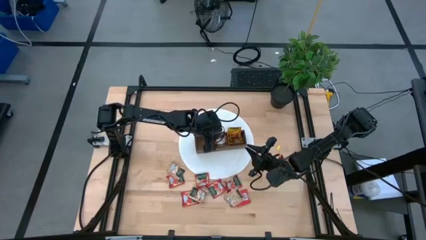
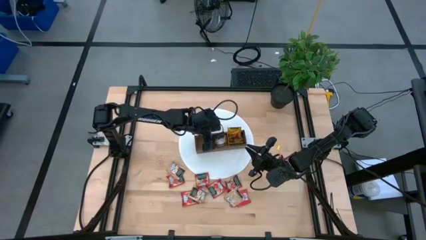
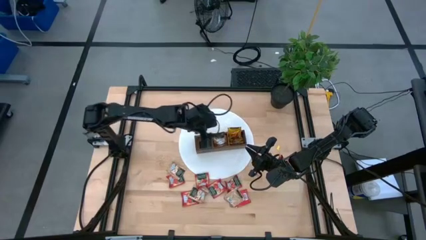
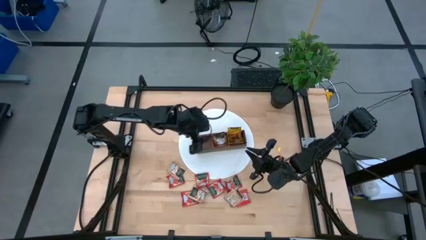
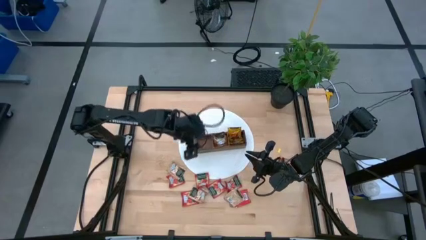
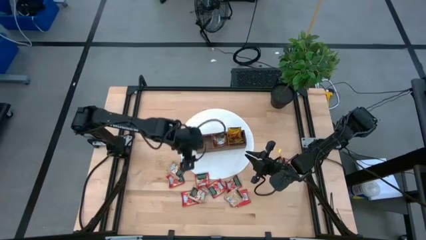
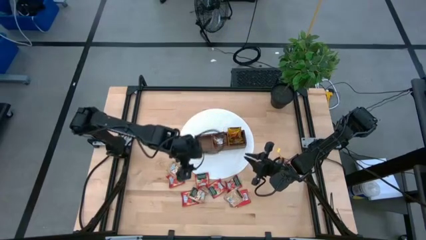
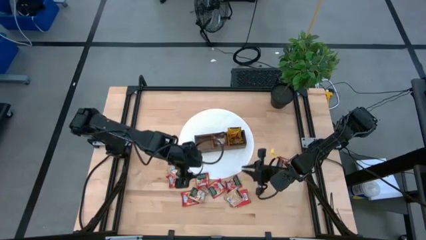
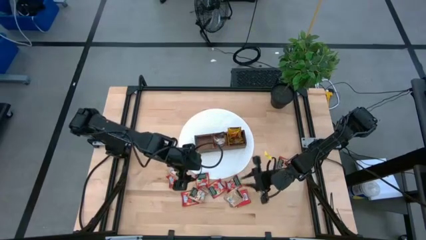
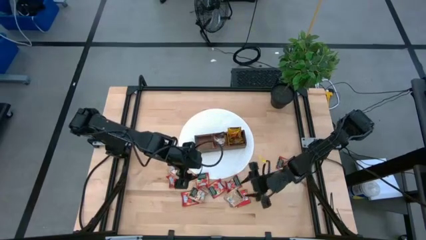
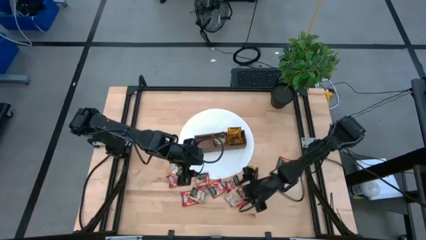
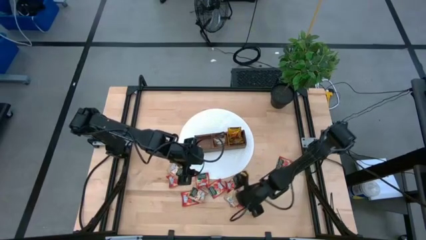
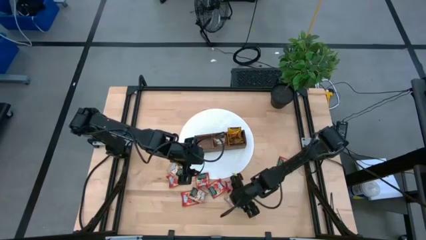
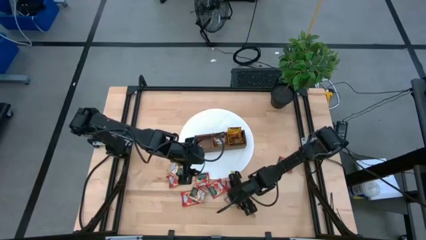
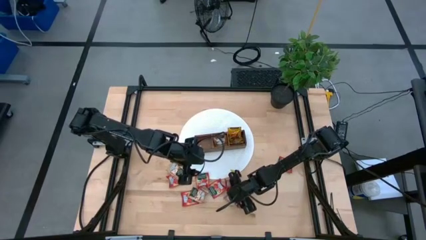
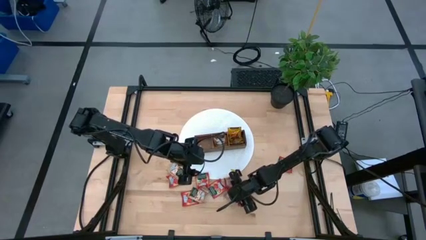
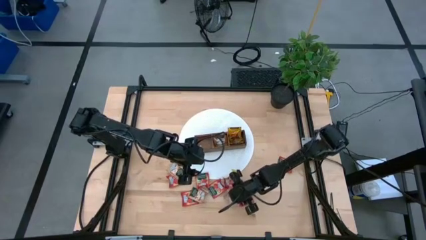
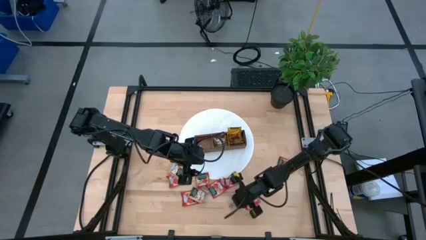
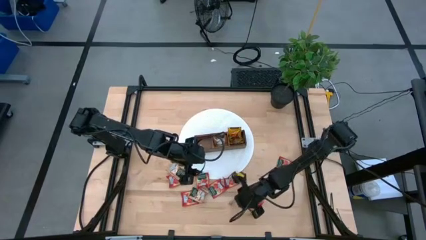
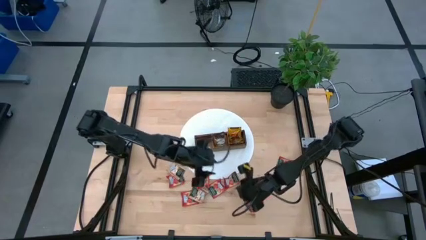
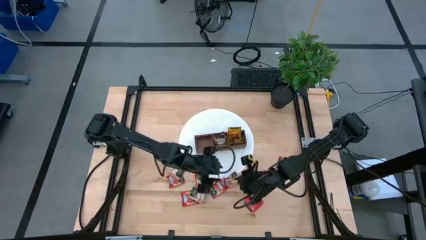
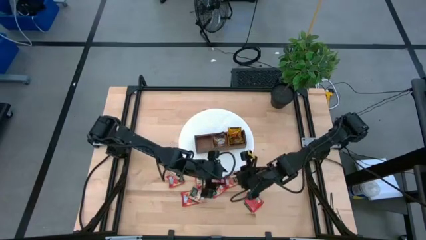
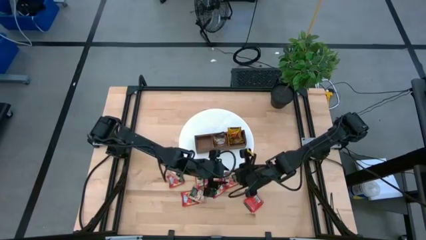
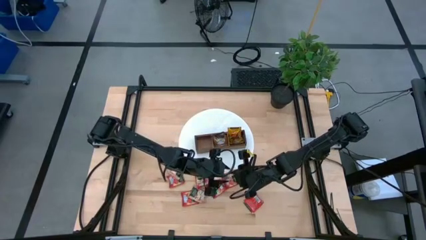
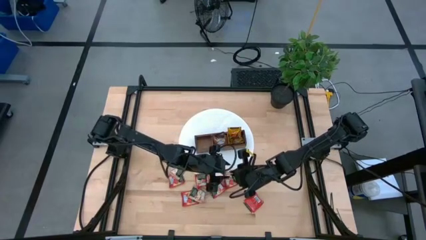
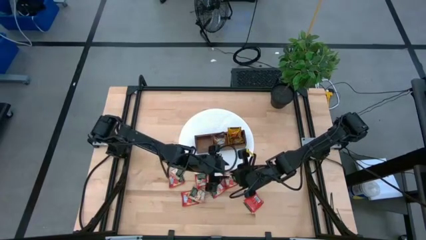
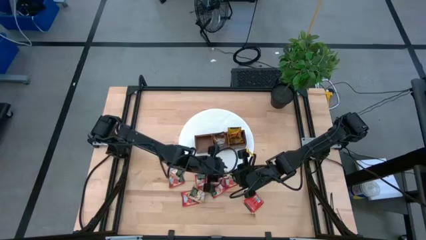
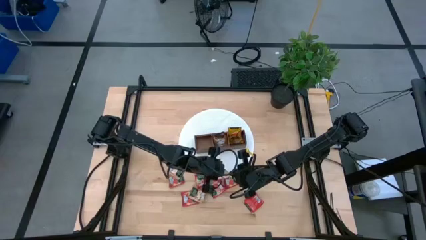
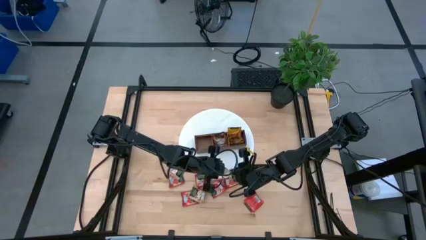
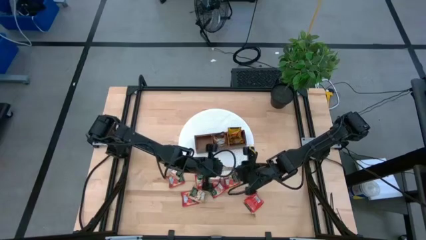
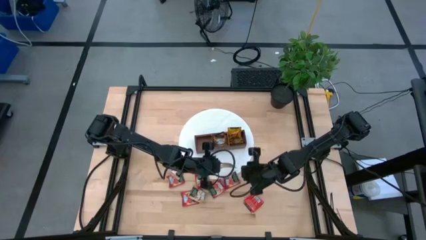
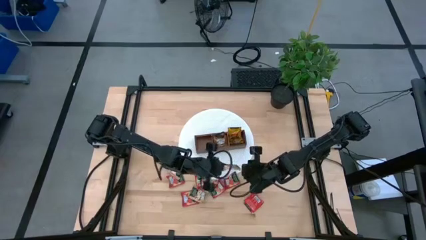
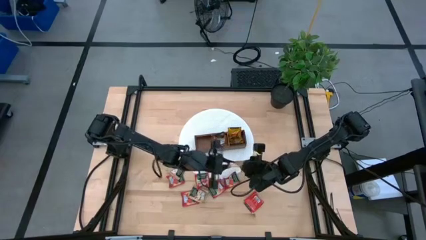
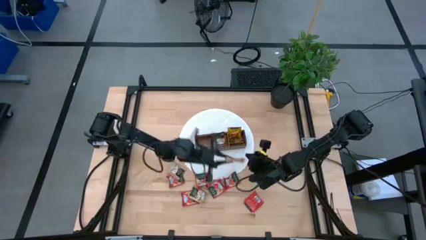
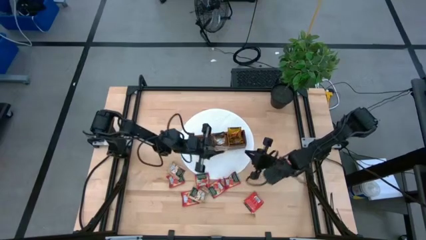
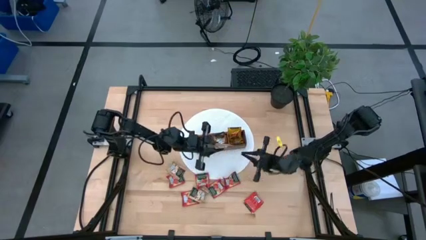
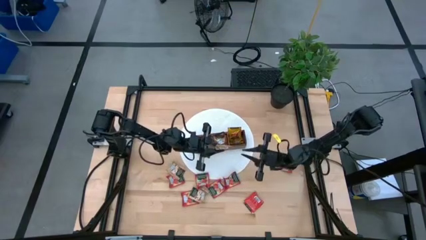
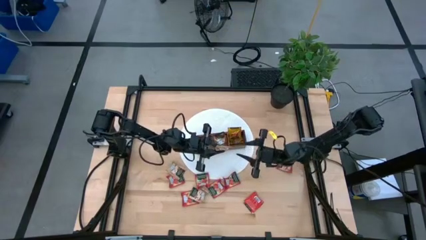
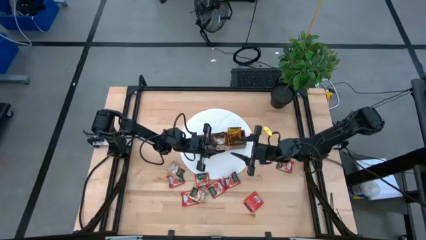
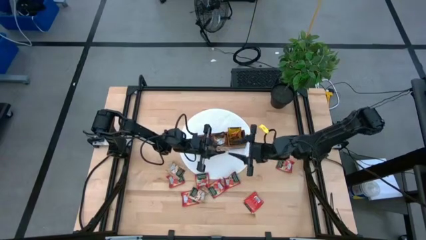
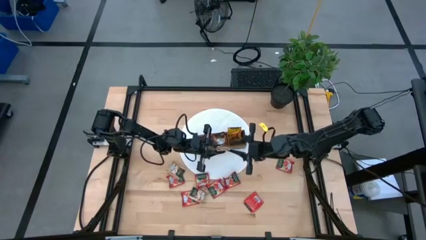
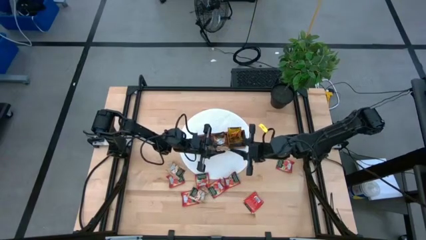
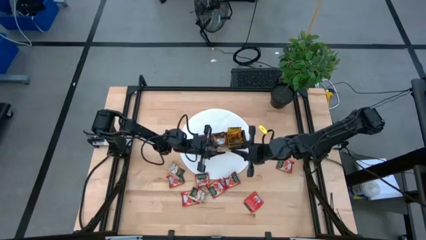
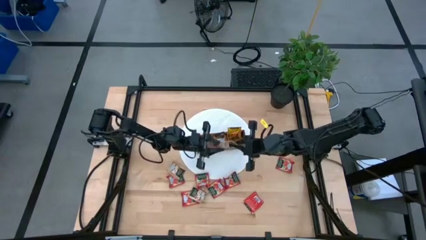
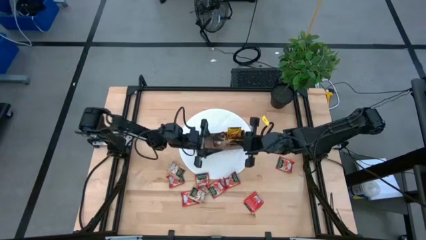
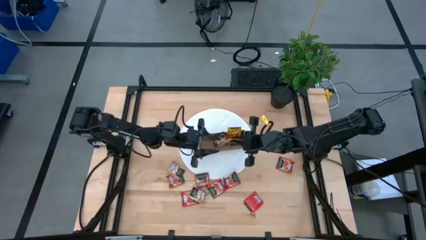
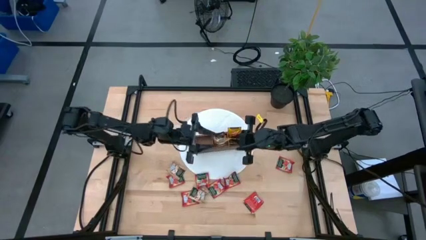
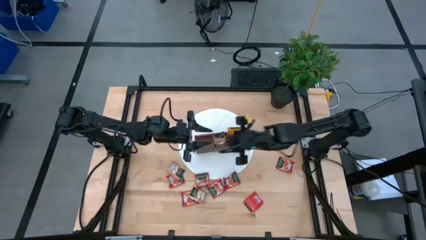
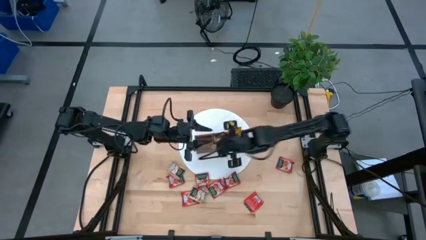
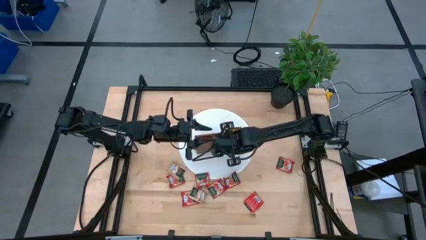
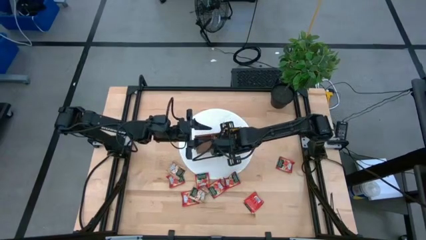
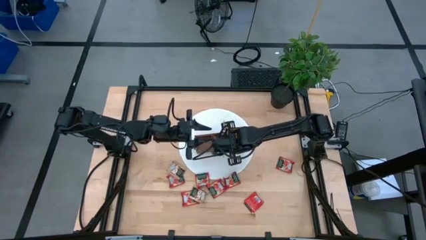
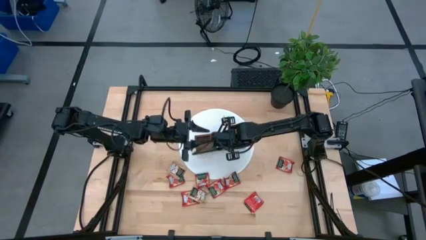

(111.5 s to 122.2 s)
Task: Pick & Place Tea
Put the brown tea bag into the middle section of the wooden organizer

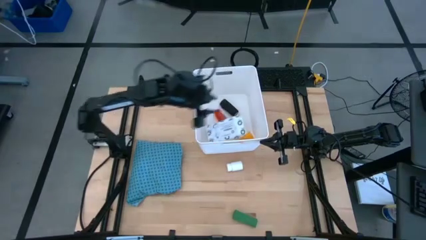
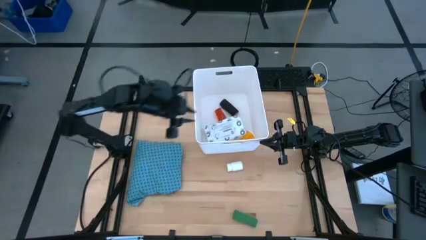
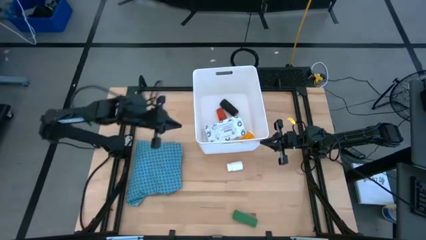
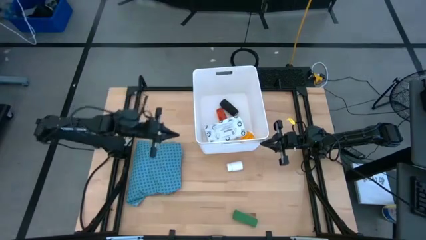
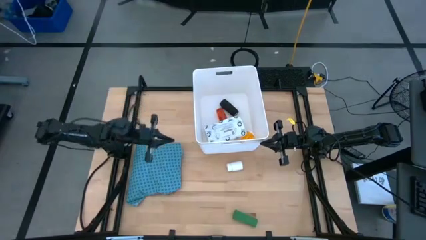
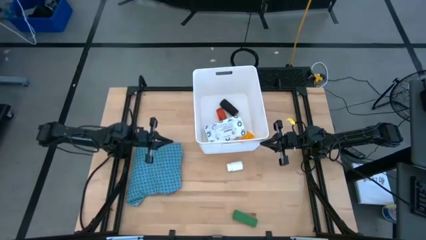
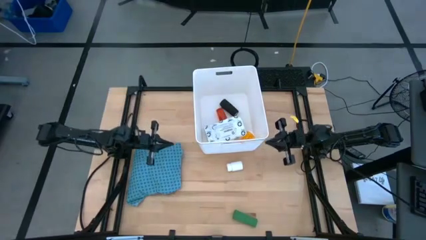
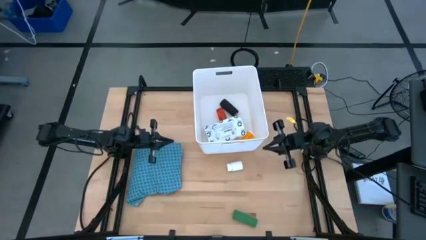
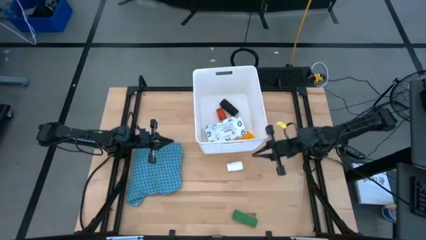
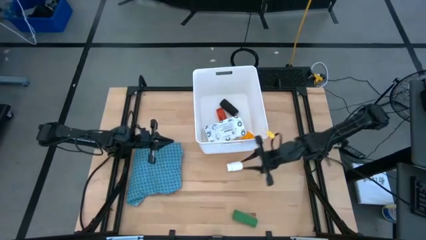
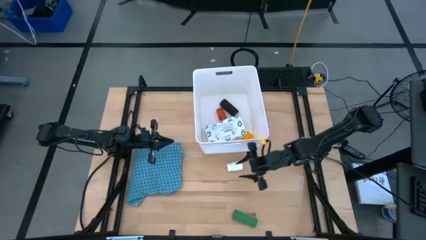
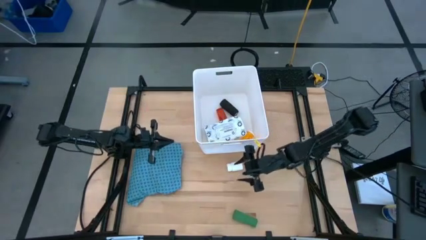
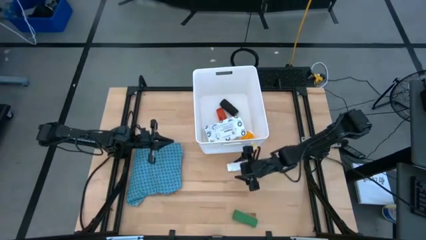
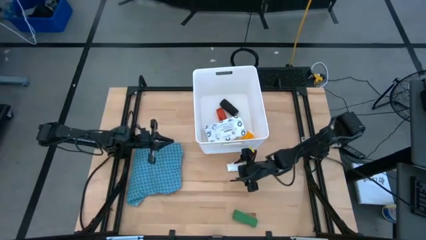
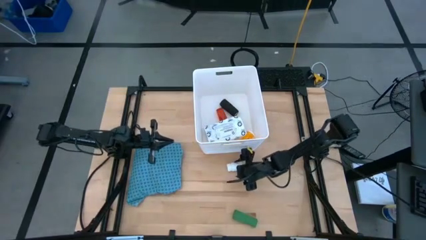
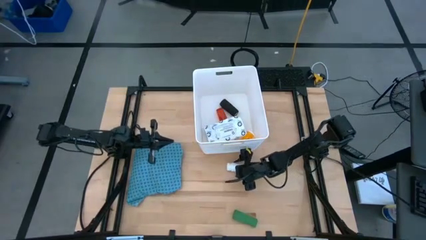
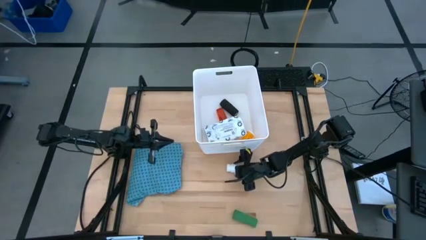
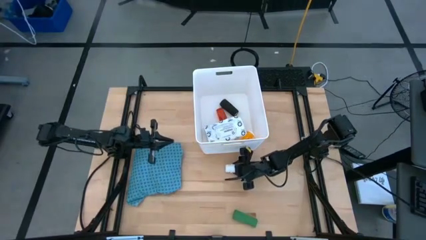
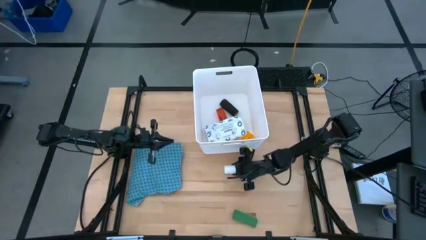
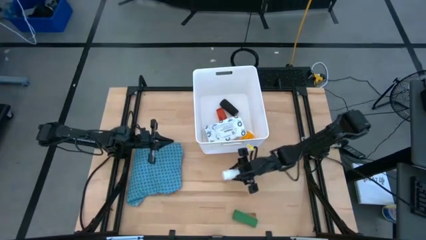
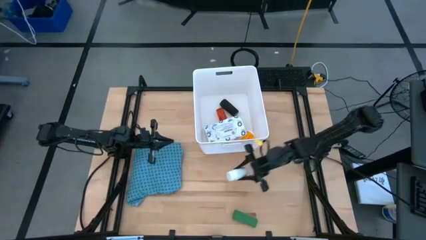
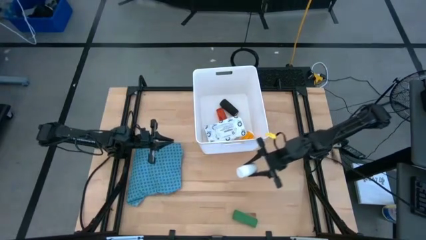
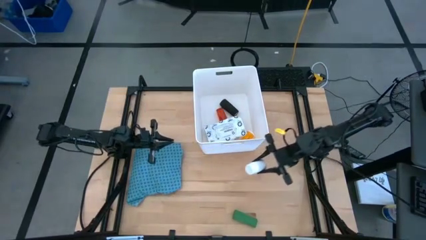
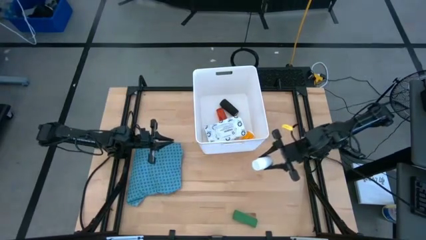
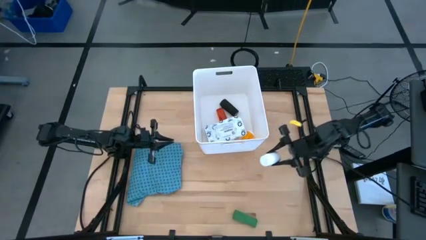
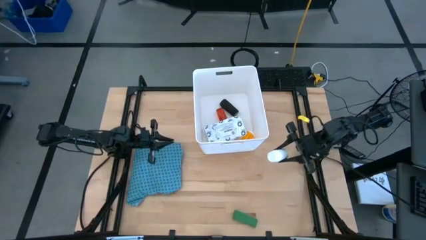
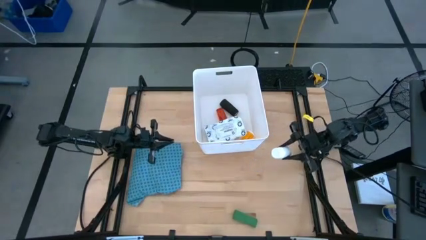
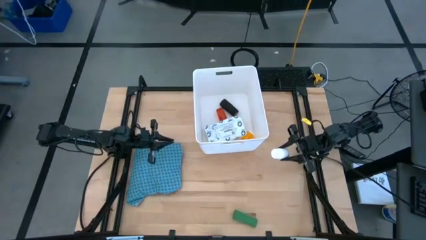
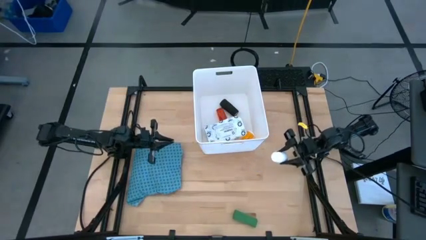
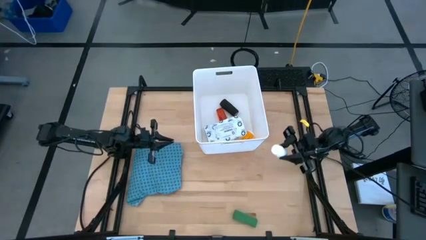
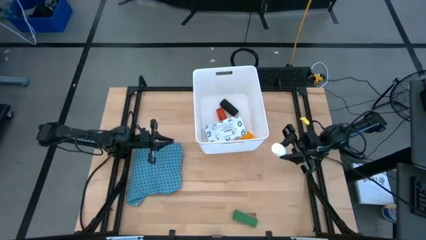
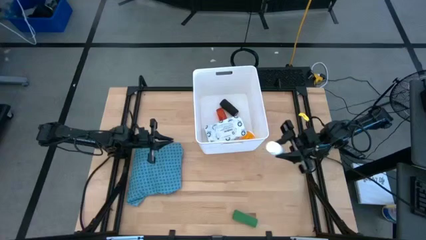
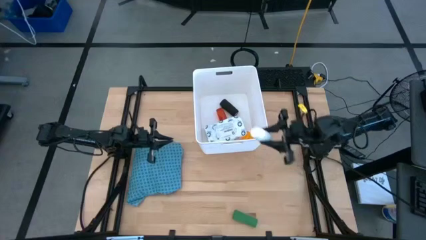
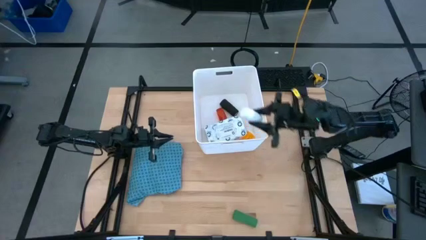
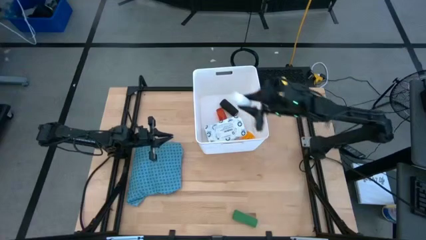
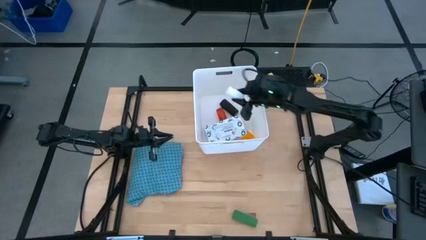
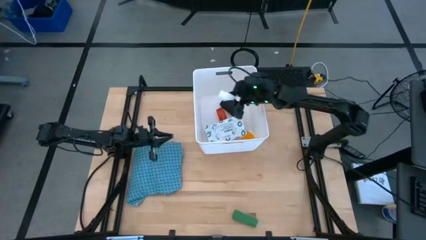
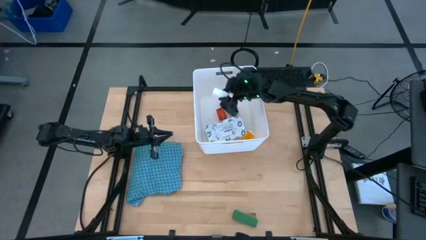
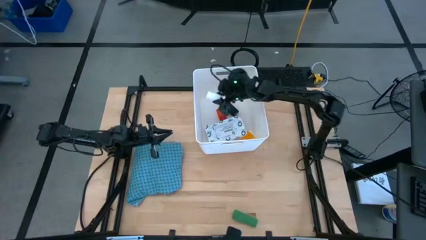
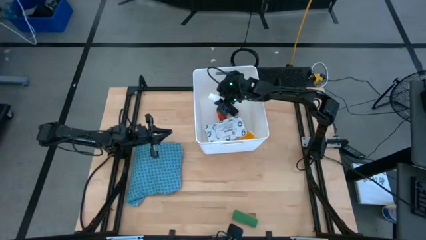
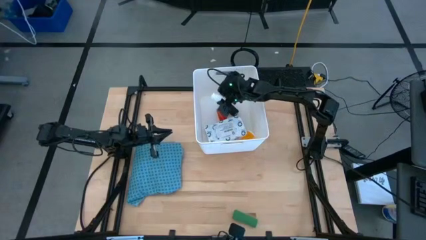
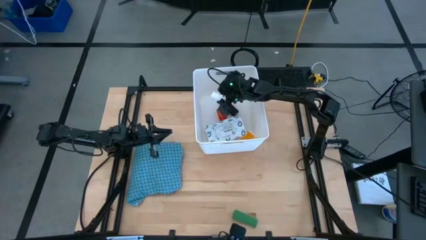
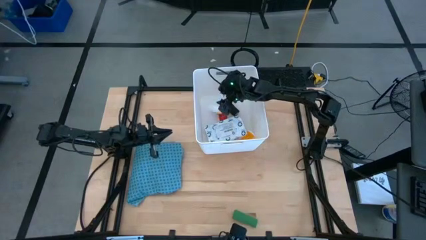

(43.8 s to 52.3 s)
Task: Pick & place medical supplies in basket/bin
Put the white pill bottle in the white basket
